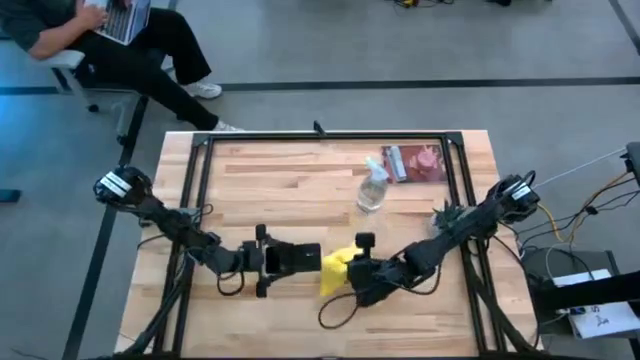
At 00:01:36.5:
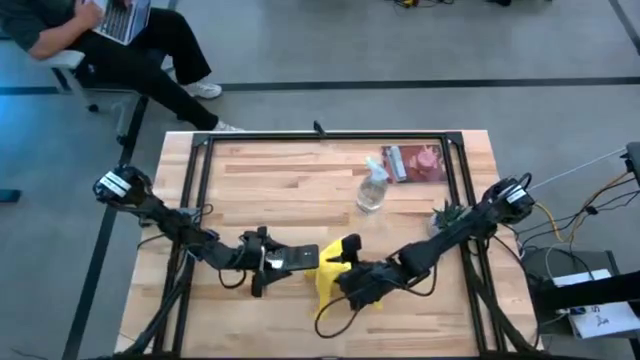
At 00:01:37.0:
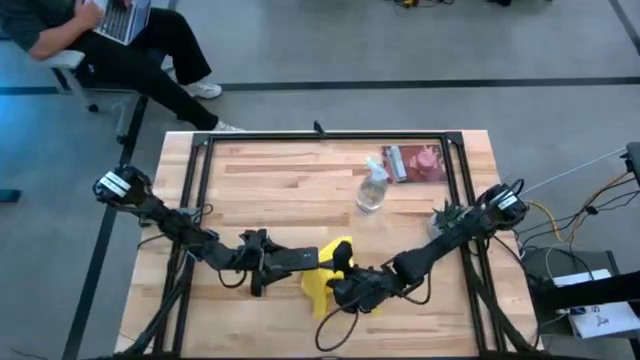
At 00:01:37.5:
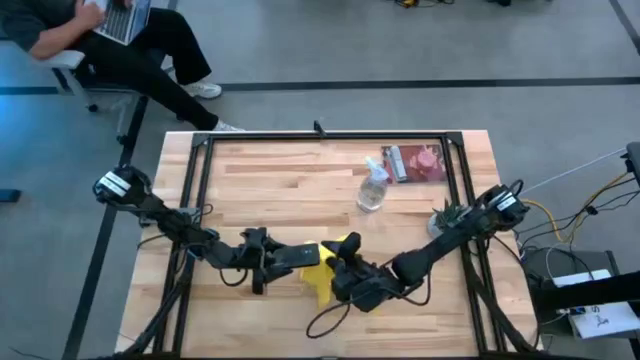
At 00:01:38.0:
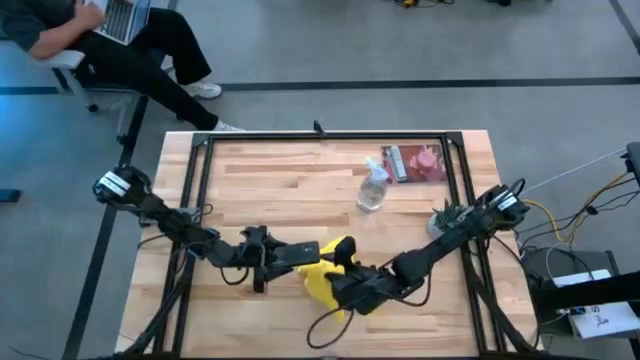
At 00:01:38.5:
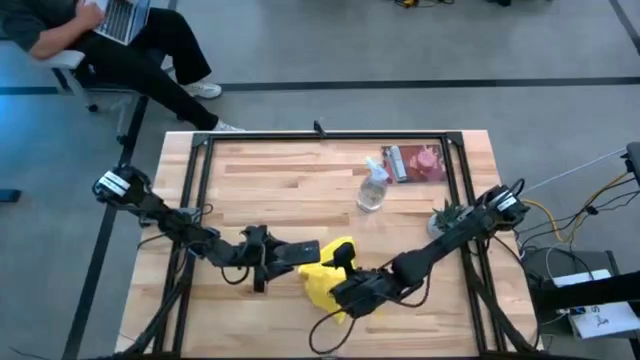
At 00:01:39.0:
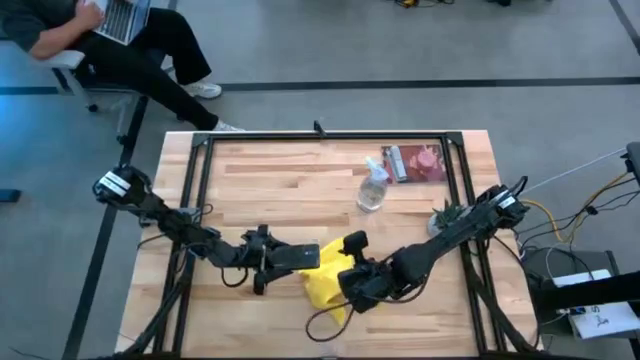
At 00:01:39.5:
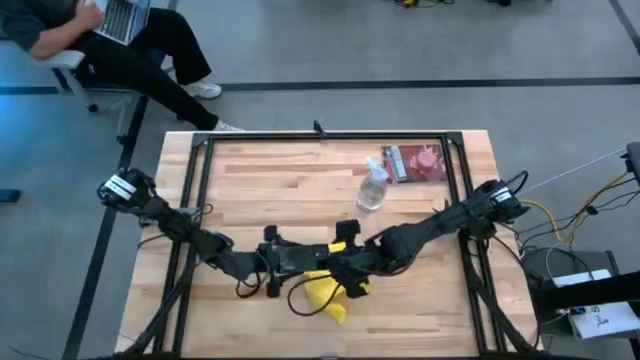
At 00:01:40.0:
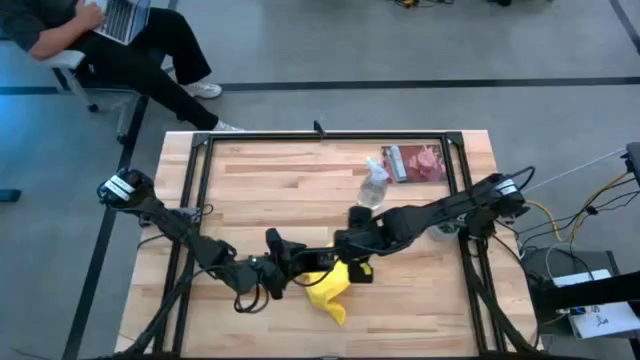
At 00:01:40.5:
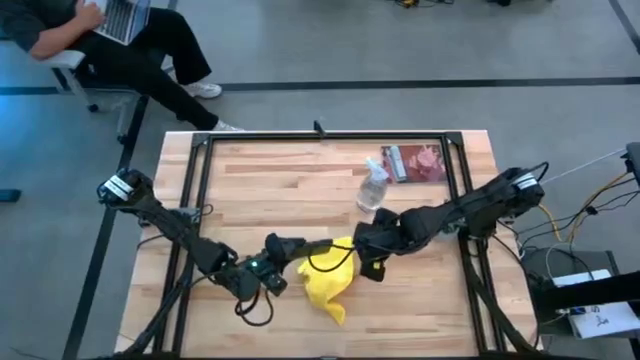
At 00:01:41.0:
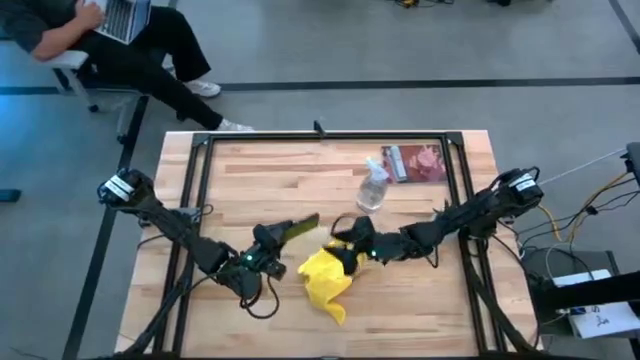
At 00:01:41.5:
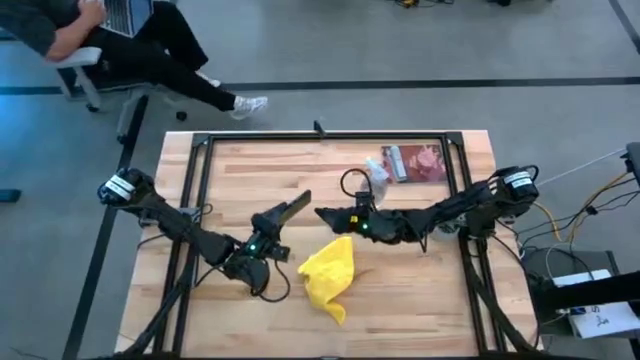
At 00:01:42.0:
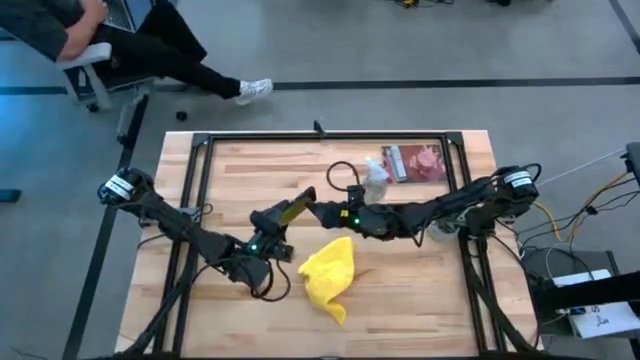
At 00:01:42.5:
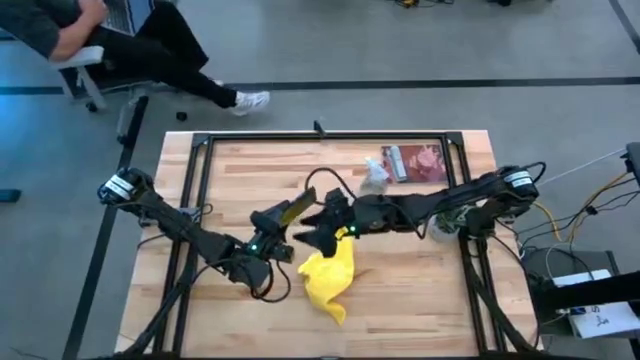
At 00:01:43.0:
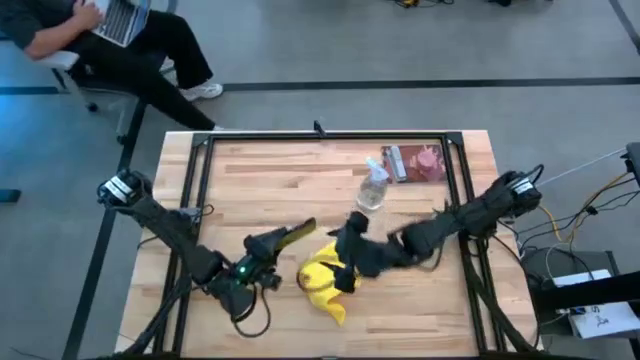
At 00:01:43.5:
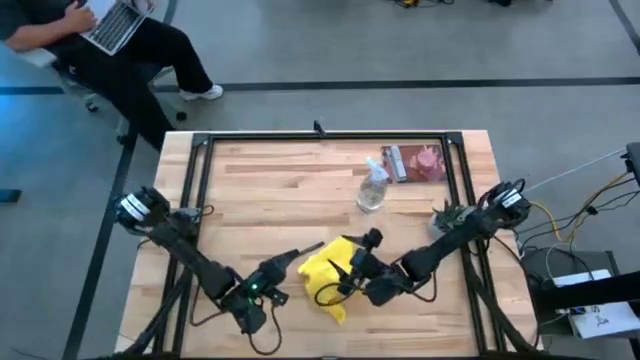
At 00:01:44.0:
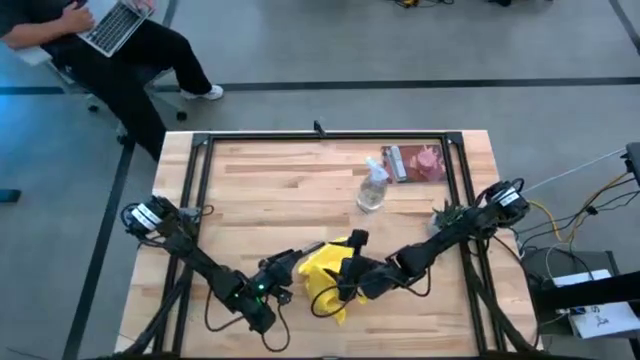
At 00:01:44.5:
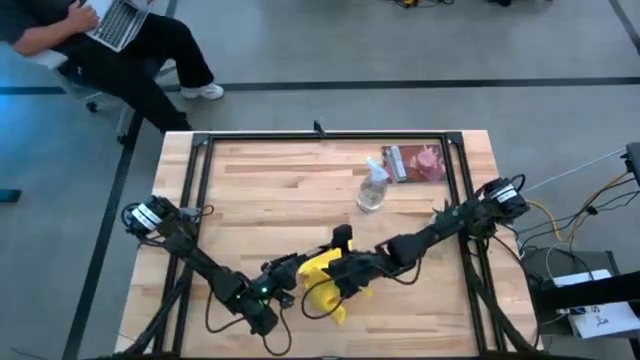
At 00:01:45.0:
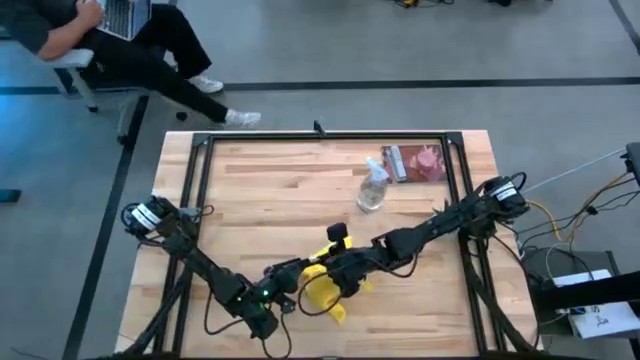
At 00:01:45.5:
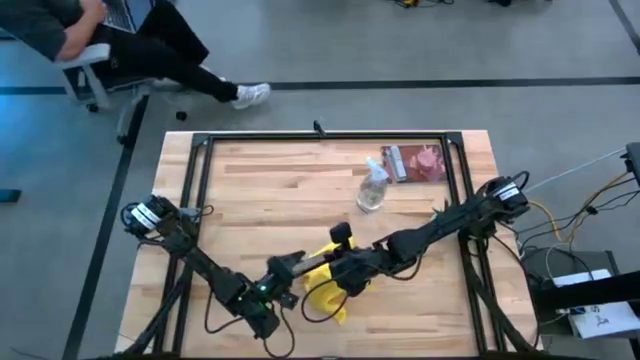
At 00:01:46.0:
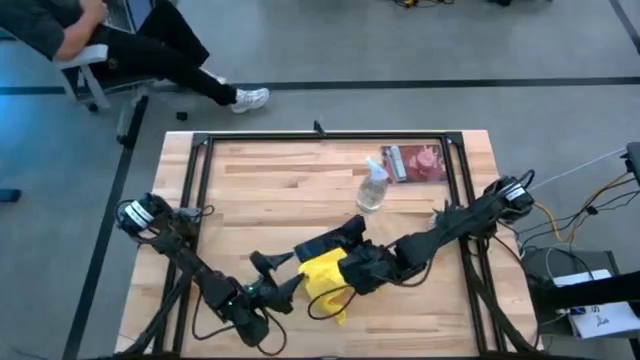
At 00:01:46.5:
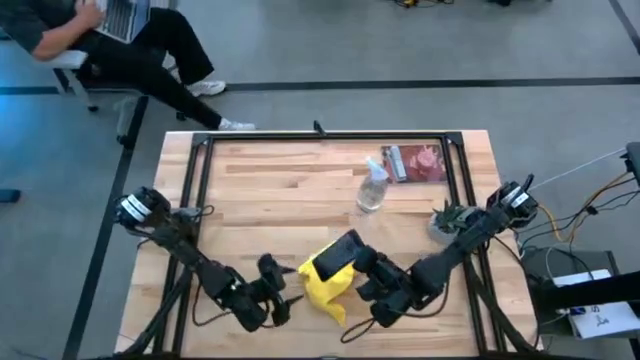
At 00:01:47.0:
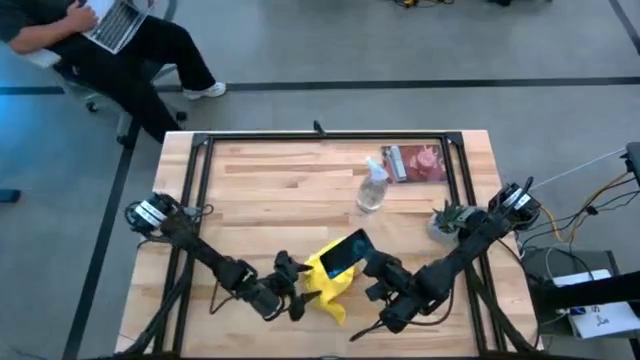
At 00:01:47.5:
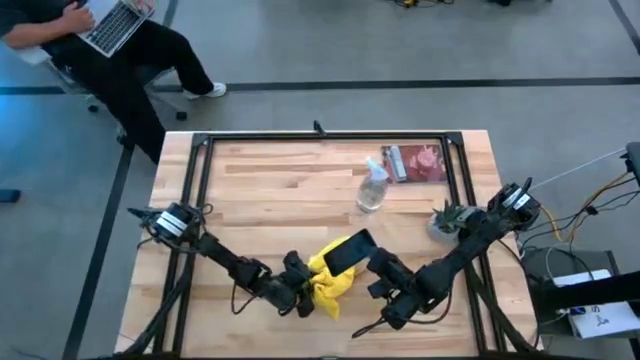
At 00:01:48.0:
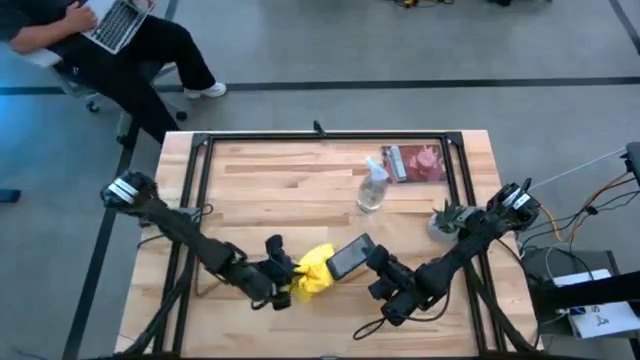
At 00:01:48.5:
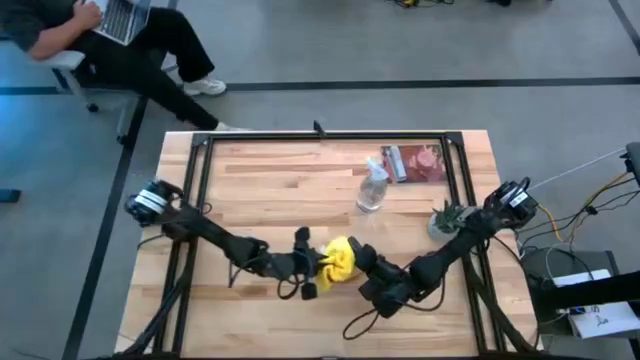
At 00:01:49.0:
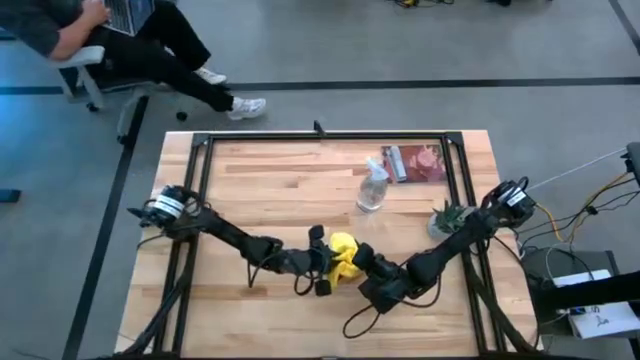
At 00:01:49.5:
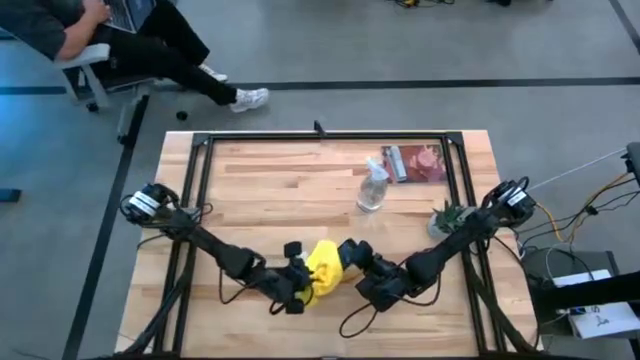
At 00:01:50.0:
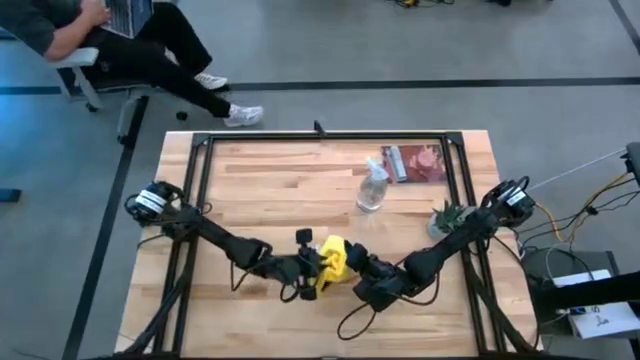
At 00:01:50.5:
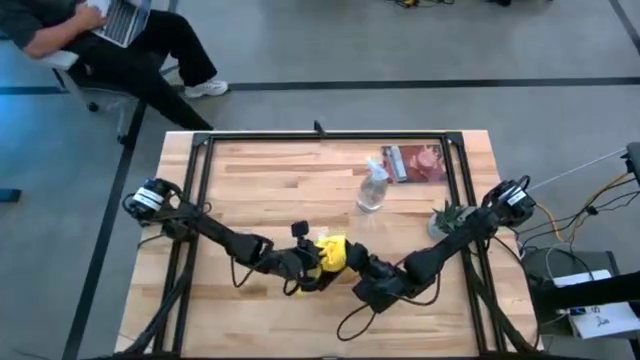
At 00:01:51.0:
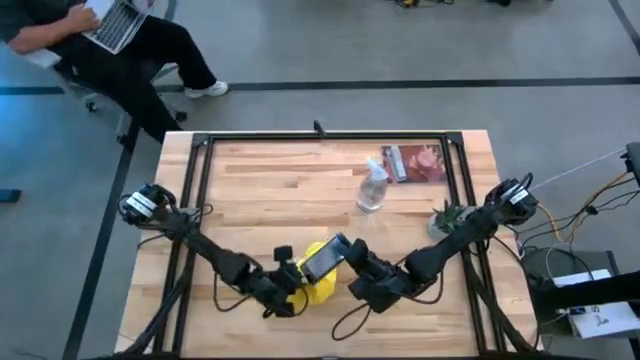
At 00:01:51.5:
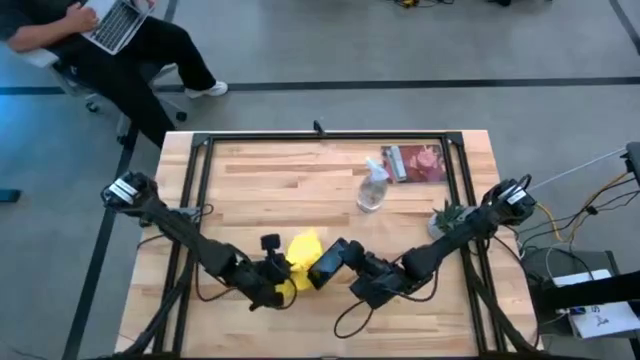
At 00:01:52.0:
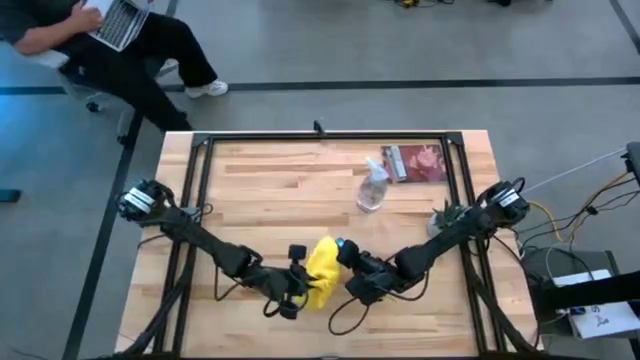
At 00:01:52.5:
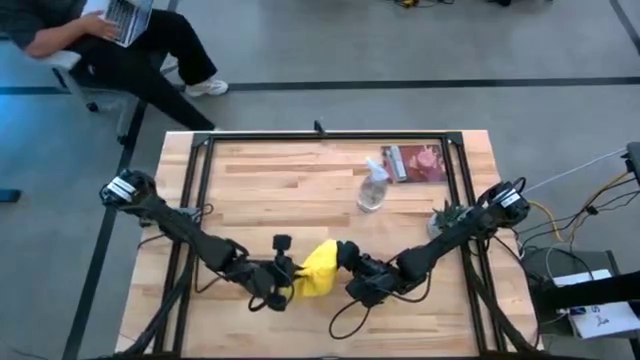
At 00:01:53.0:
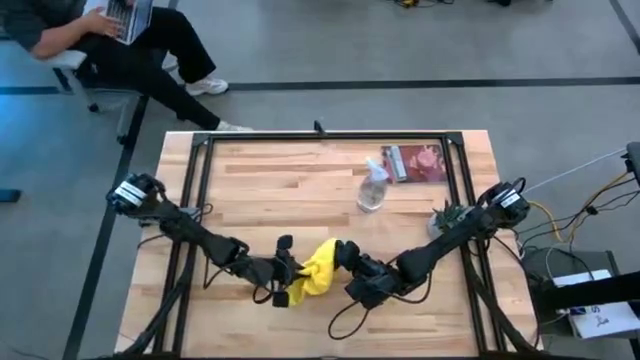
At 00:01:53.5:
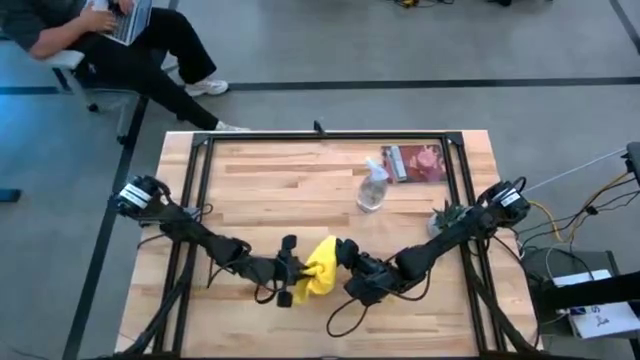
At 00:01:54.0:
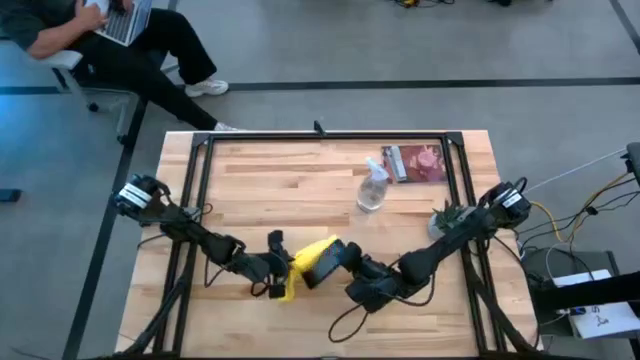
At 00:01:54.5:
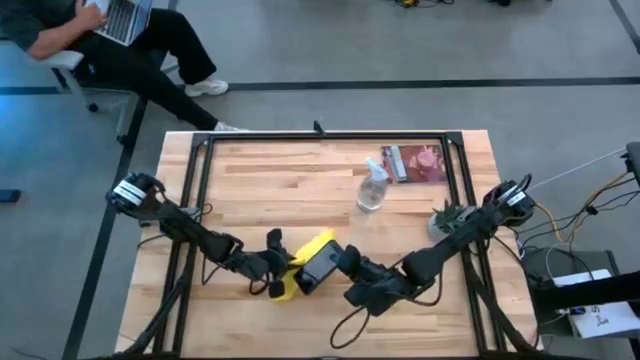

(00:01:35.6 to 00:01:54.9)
Task: Apply microfiber cloth
Wipe the black cellphone with the yellow microfiber cloth

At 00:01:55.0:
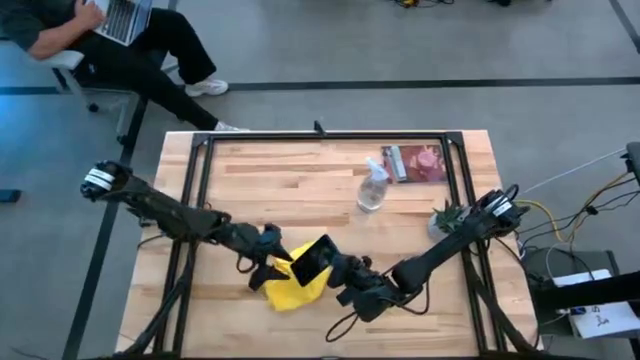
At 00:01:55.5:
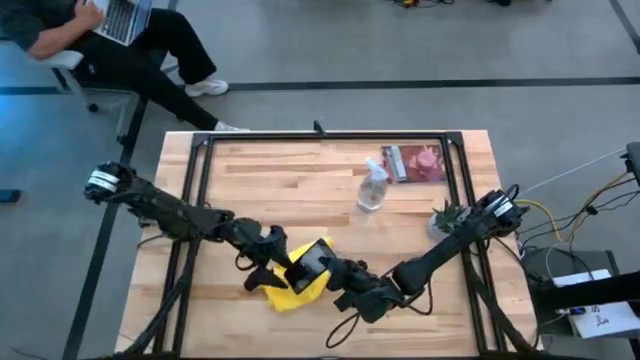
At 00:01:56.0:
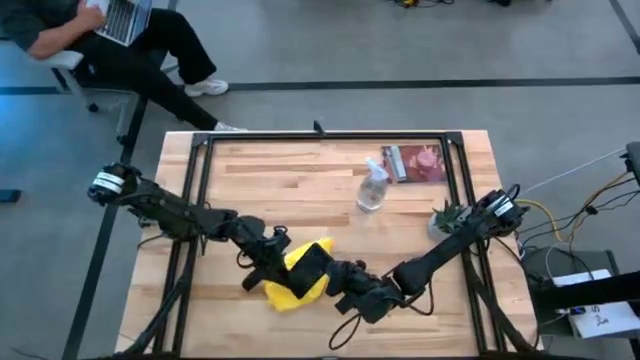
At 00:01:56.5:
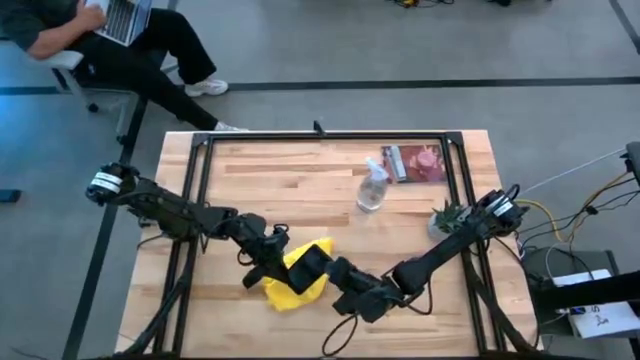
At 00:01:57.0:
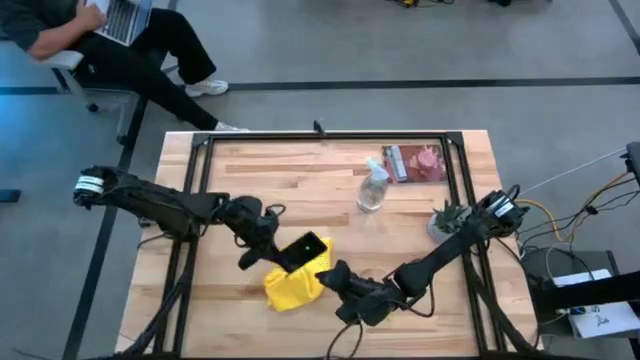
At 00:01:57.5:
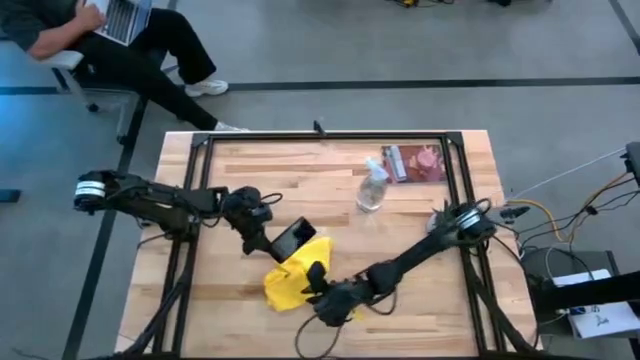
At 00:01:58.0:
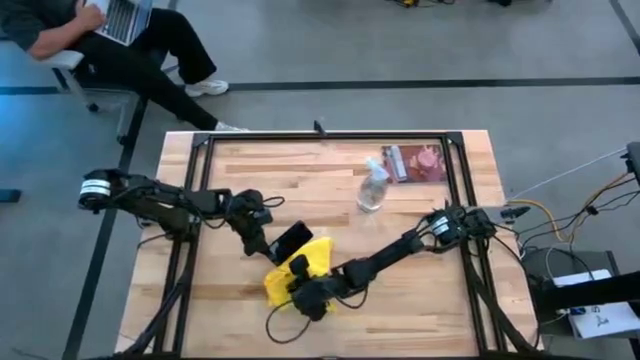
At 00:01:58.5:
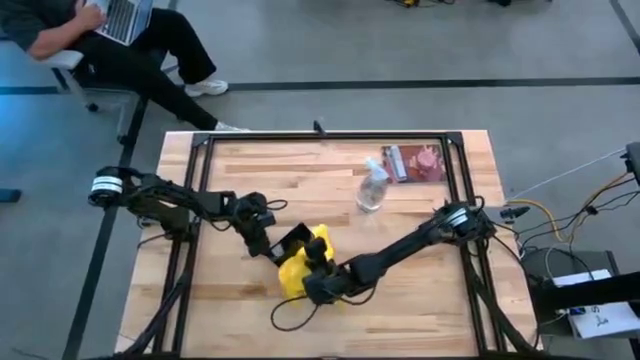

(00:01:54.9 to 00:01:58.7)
Wipe the black cellphone with the yellow microfiber cloth
